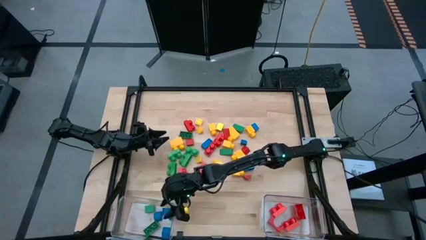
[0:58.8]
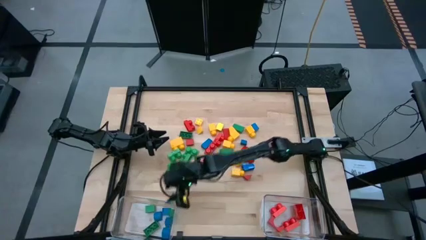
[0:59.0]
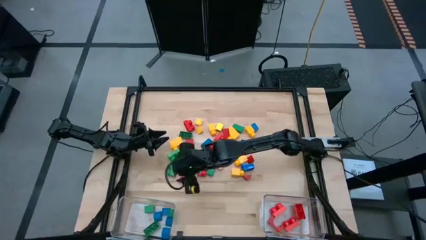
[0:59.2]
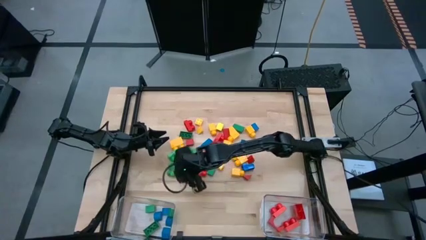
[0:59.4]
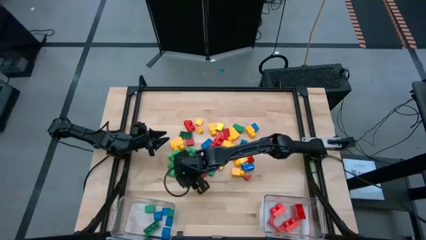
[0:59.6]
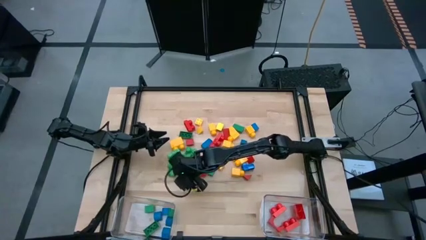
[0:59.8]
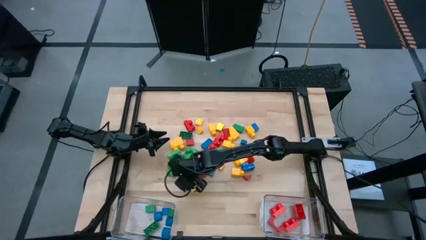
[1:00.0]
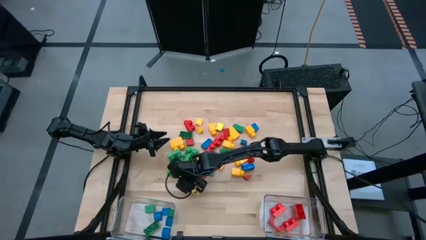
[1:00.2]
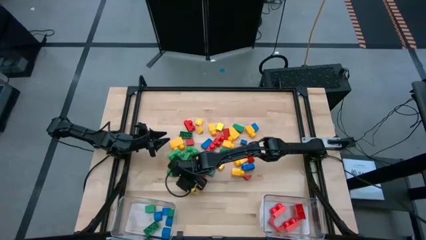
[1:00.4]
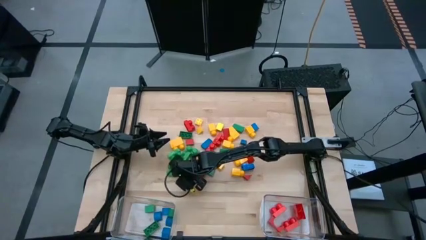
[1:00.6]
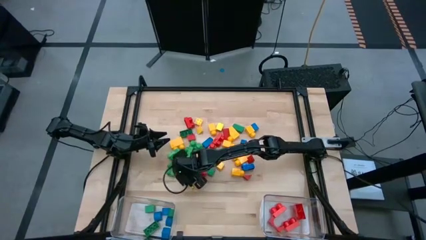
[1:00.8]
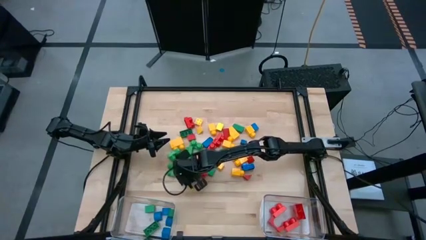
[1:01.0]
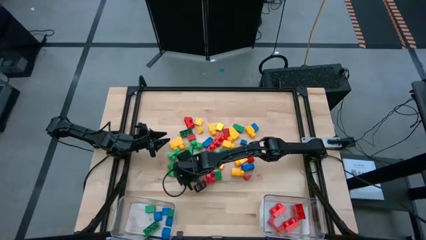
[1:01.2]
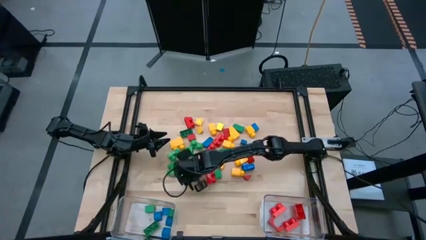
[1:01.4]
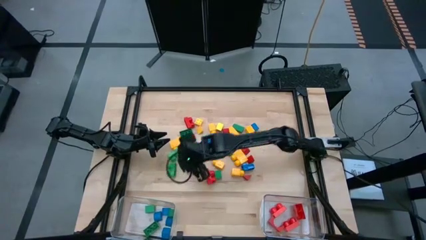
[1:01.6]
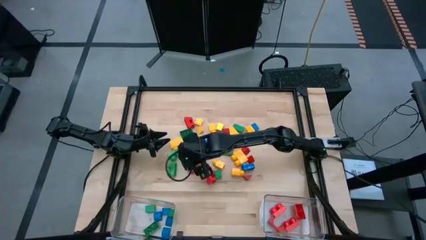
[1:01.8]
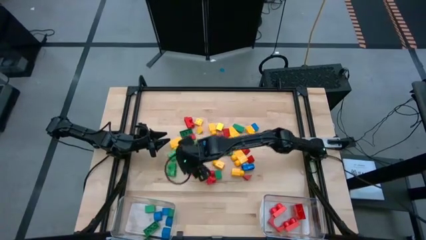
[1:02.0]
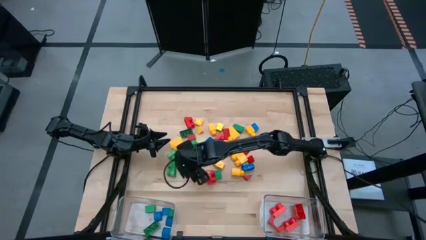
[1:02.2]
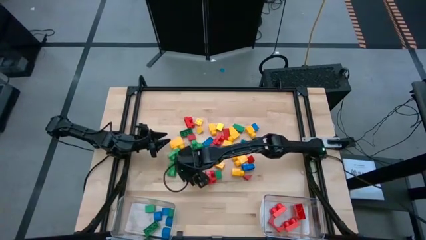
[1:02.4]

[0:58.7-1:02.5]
Task: Sort blocks by size
Put the red game piece into the right transparent bin

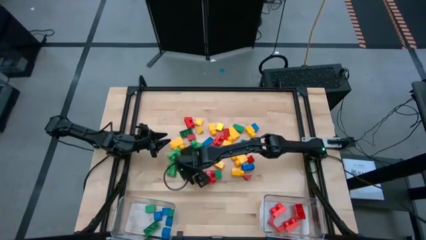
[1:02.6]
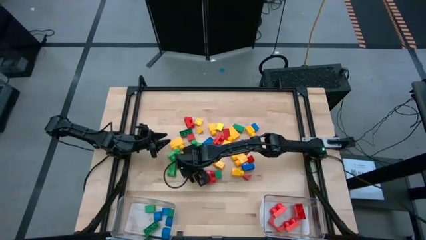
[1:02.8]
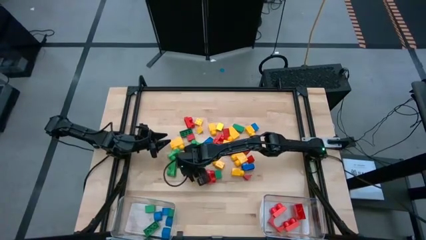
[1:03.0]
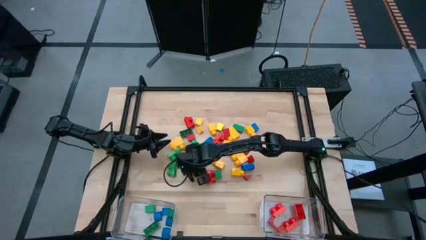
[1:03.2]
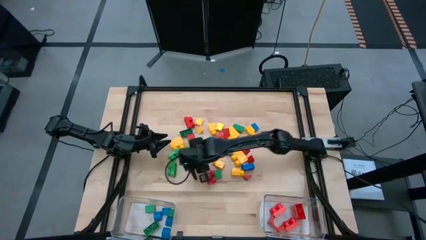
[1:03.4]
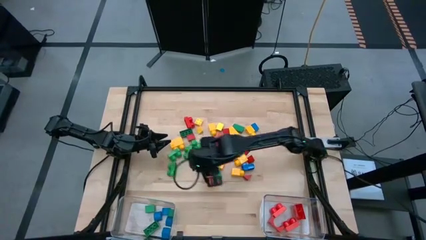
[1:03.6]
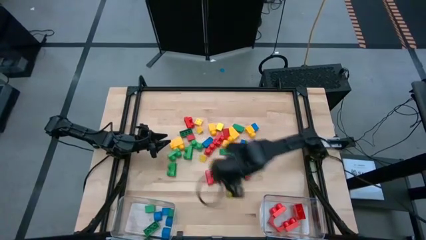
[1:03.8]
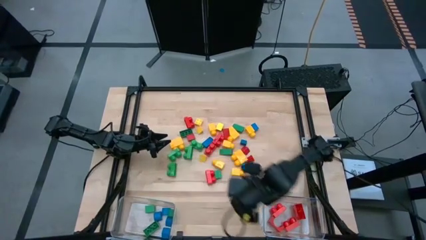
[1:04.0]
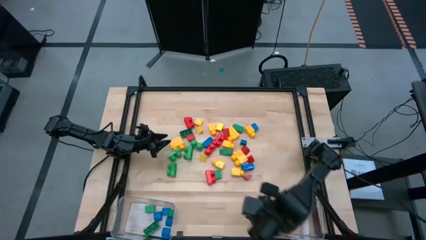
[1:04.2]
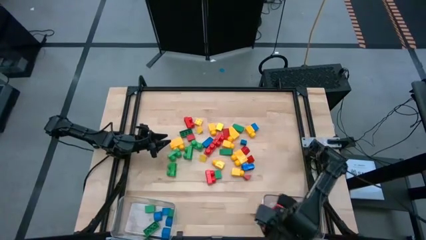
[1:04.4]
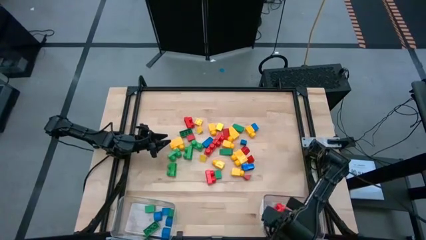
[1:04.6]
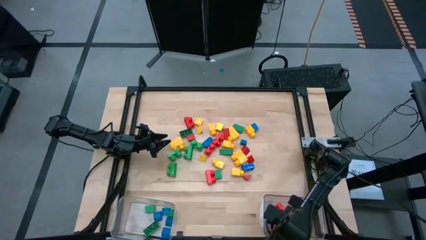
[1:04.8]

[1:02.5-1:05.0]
Put the red game piece into the right transparent bin

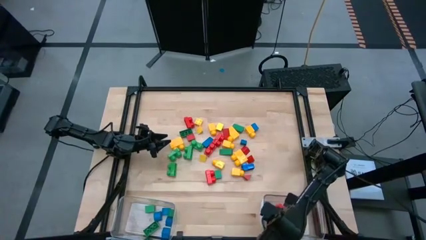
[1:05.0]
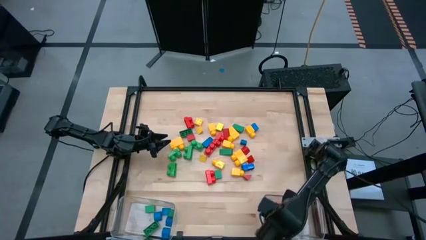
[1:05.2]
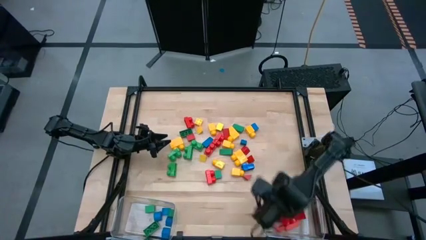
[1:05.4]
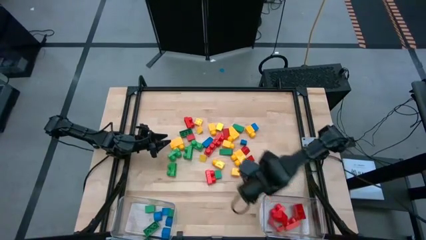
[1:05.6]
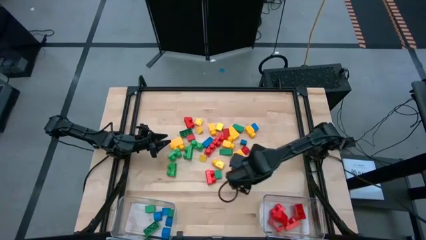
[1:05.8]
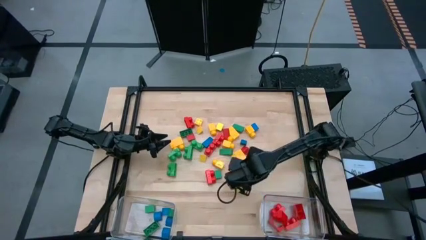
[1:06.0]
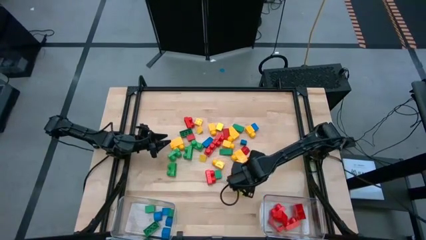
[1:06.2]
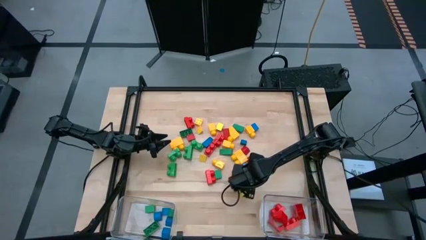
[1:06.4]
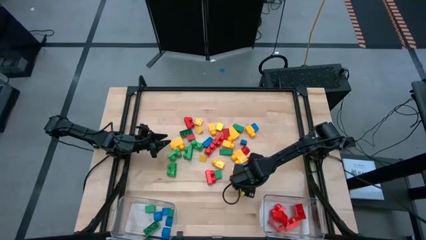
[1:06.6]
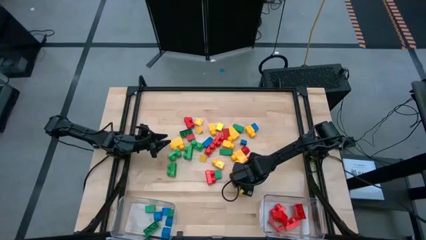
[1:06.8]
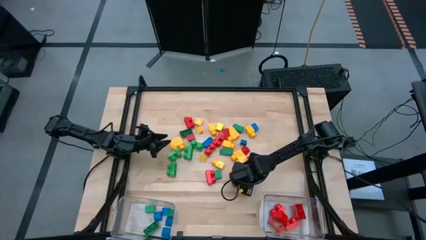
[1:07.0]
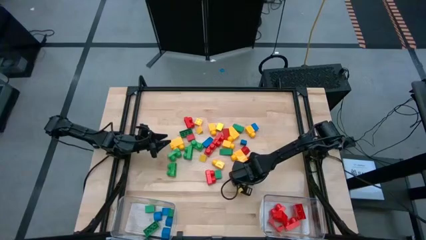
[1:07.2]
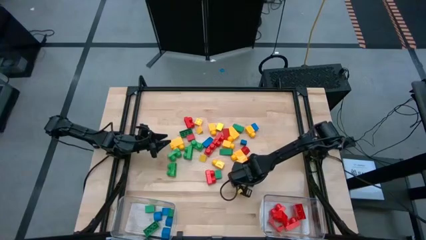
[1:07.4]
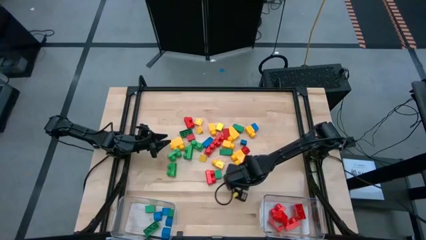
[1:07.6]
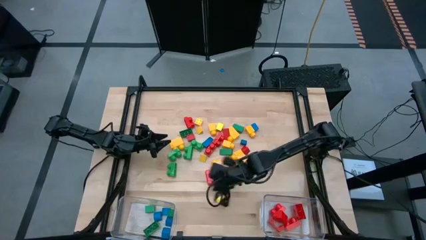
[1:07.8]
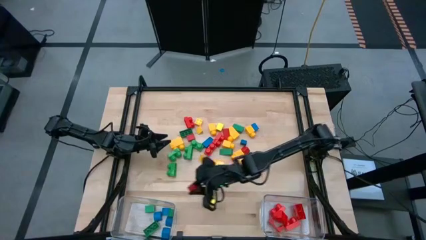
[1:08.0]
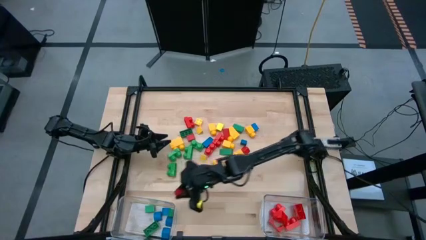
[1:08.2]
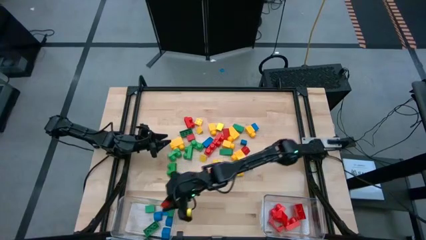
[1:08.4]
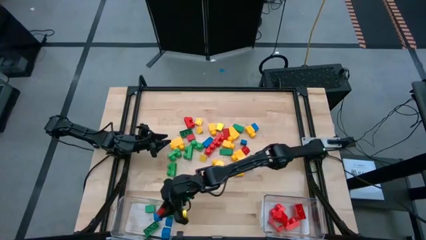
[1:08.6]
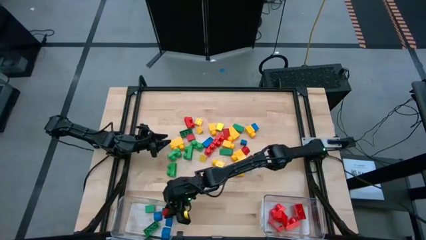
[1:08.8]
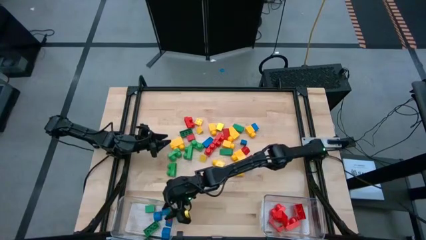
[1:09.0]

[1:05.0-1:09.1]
Put the red triangular block into the left transparent bin

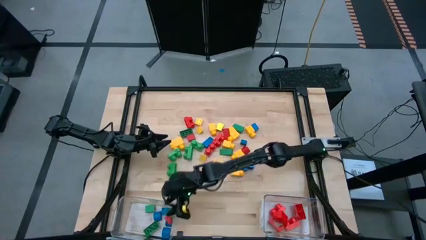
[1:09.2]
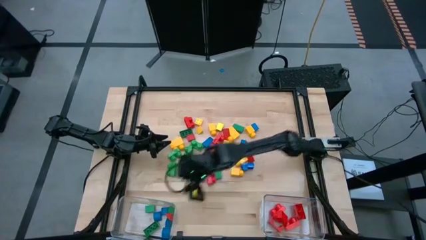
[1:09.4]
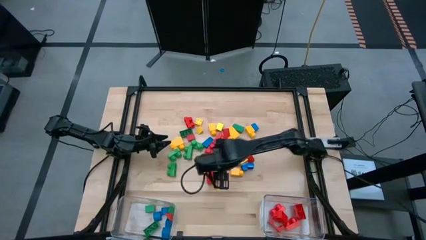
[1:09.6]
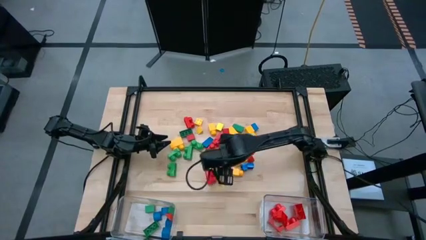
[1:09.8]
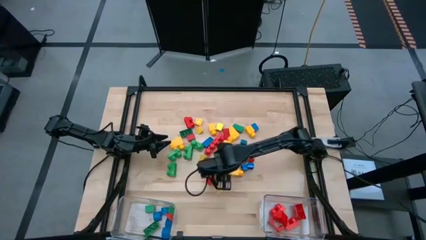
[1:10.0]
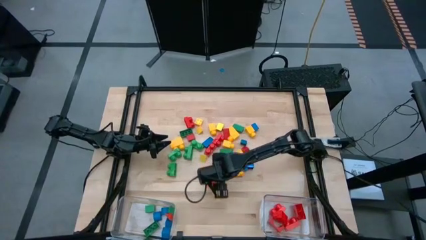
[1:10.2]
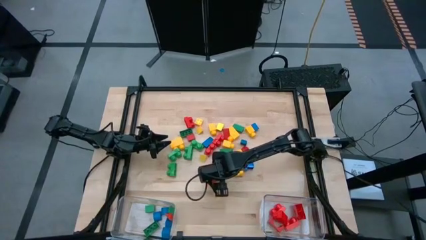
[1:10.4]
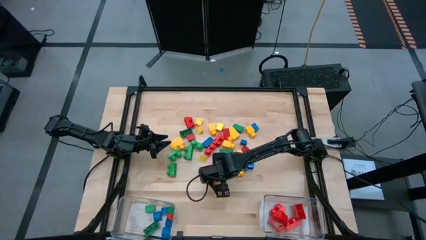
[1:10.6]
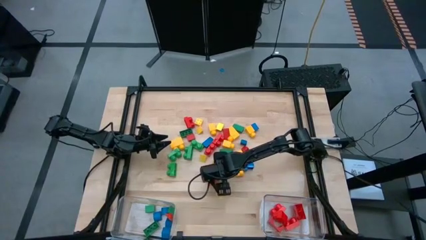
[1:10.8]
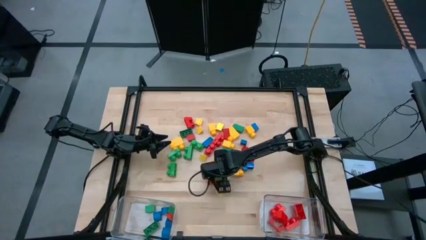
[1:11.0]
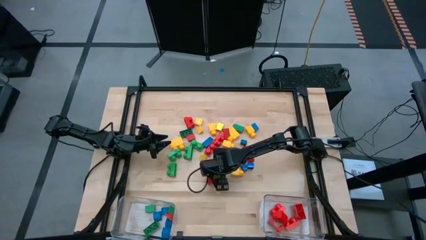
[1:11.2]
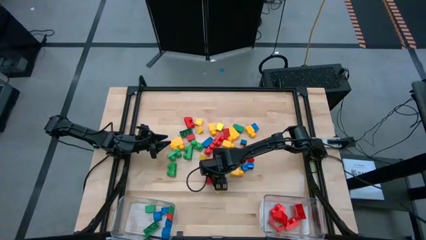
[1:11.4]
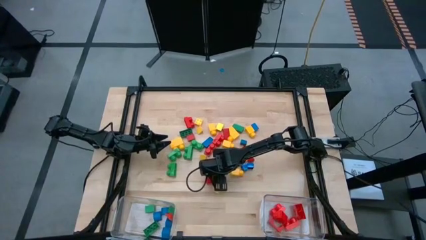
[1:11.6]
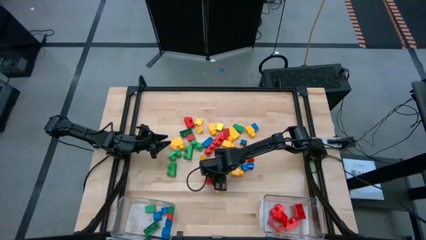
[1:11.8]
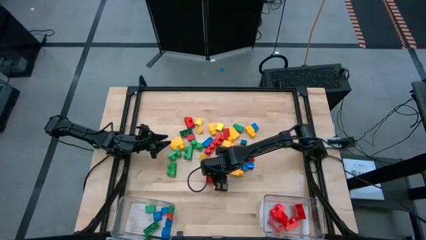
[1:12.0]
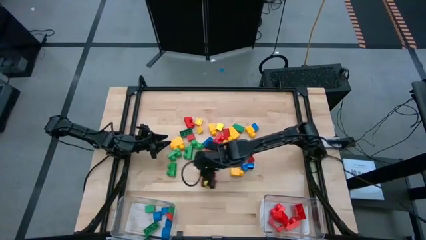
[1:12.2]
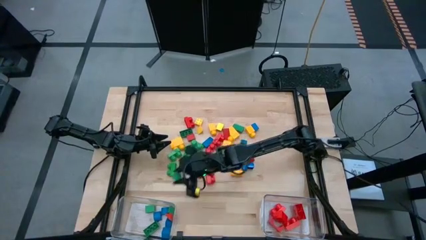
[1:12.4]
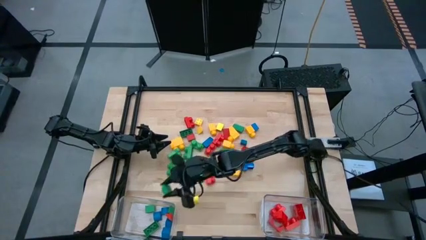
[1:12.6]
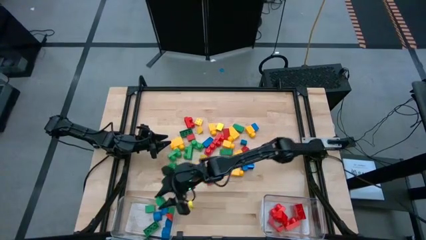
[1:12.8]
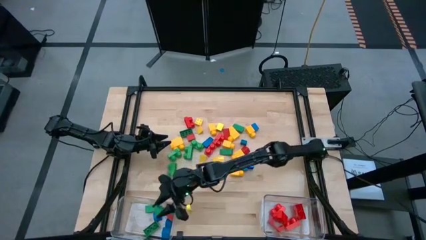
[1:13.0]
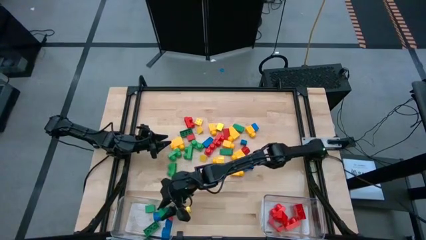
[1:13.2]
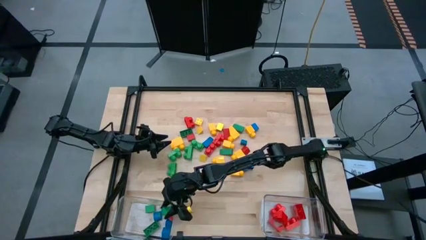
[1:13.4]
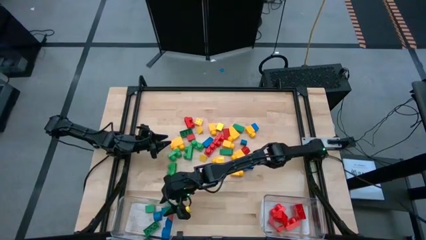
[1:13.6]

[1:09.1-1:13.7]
Put the green half cylindrical block into the left transparent bin
